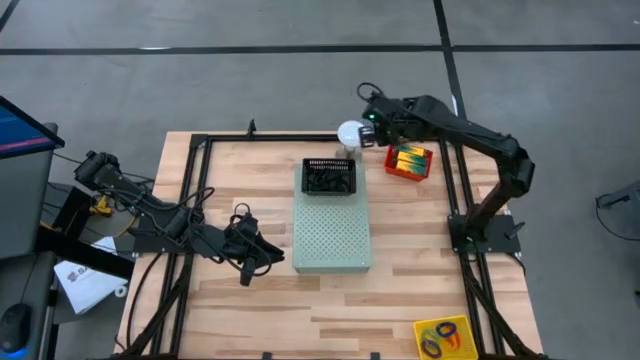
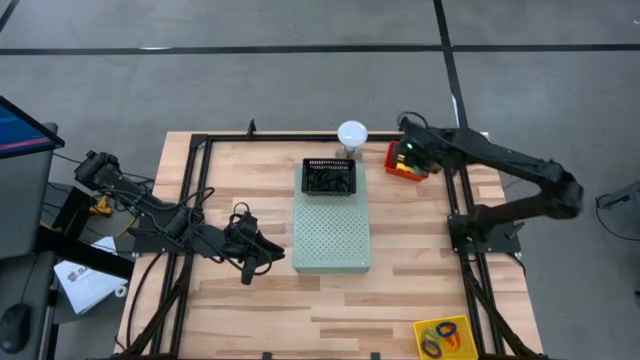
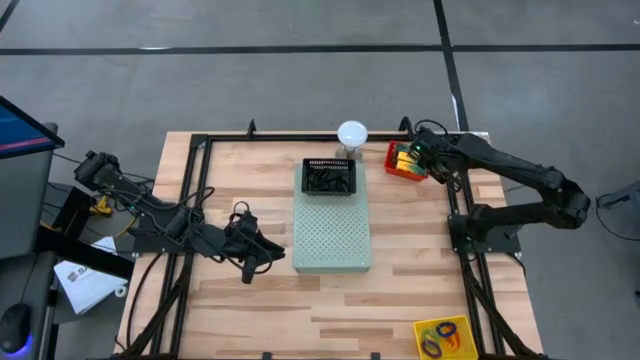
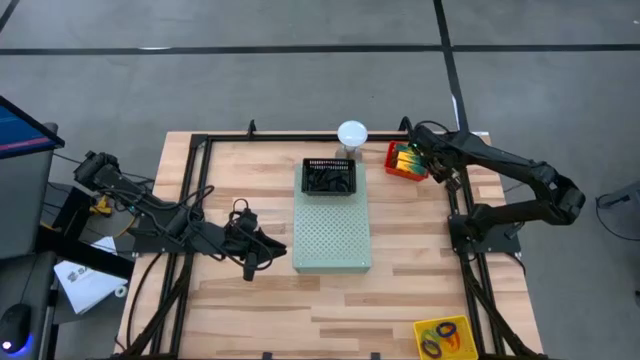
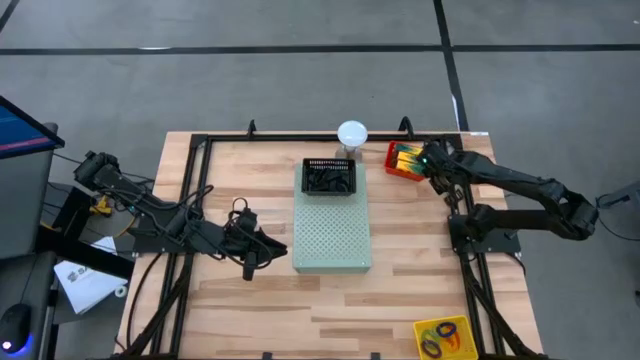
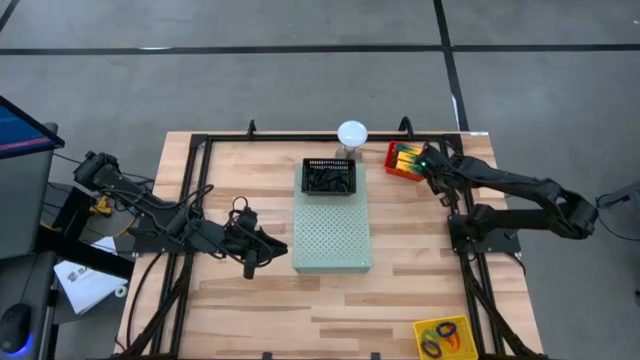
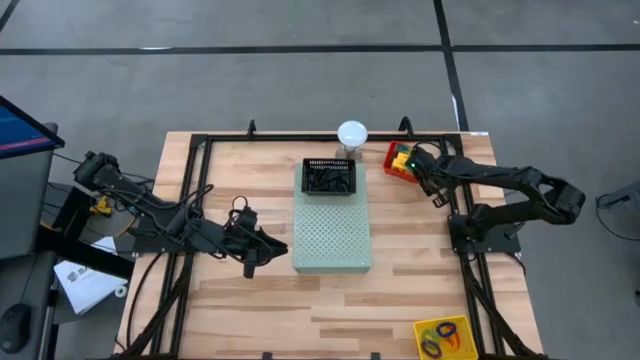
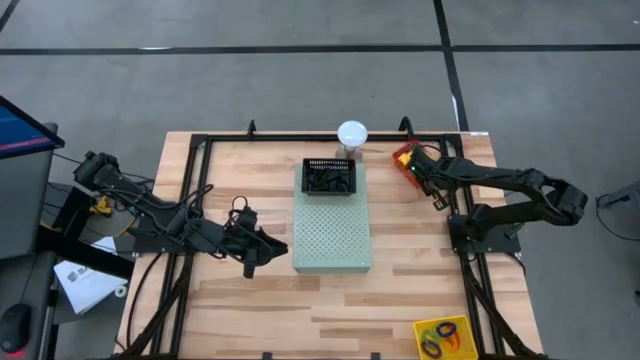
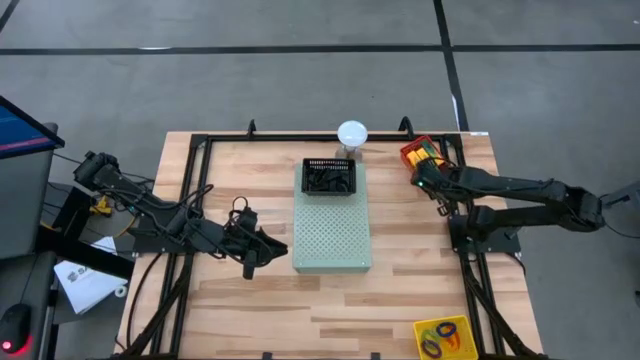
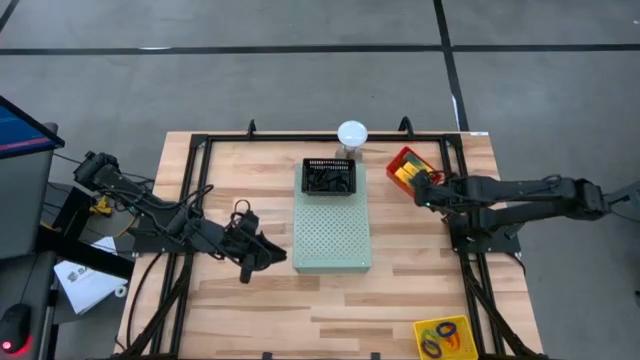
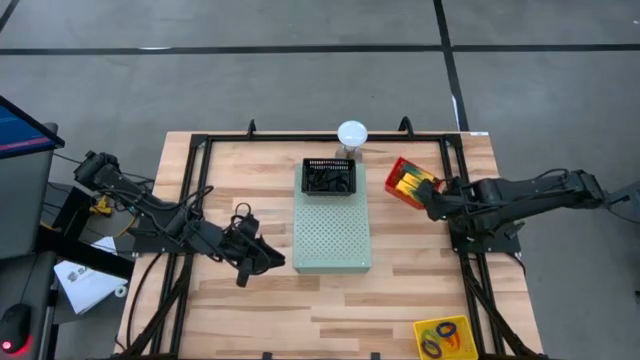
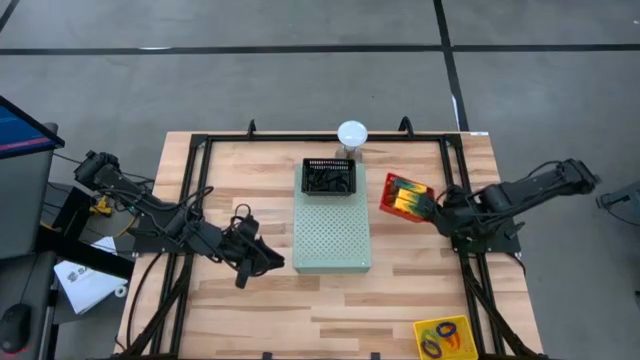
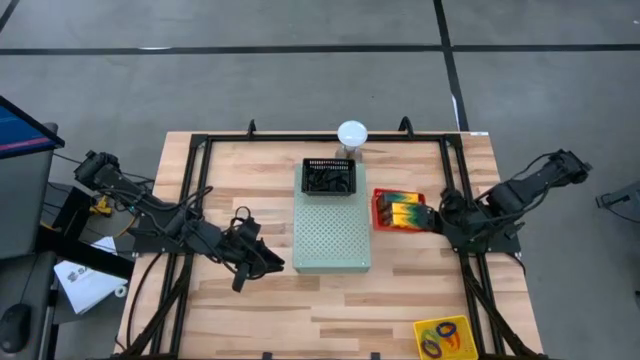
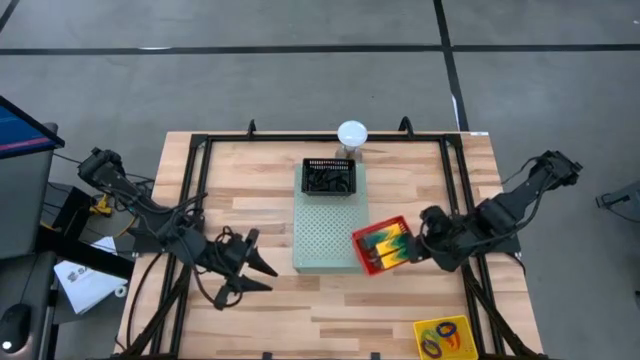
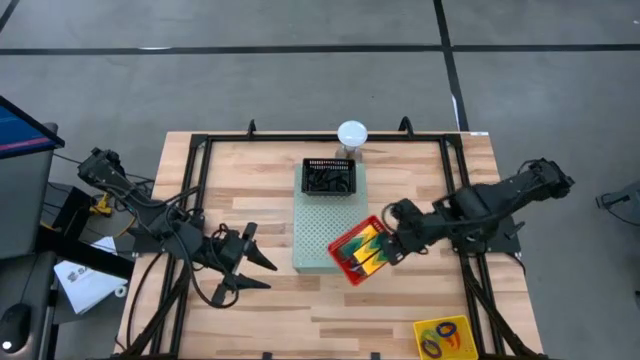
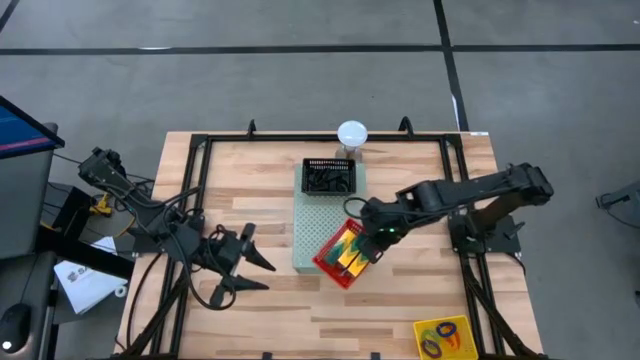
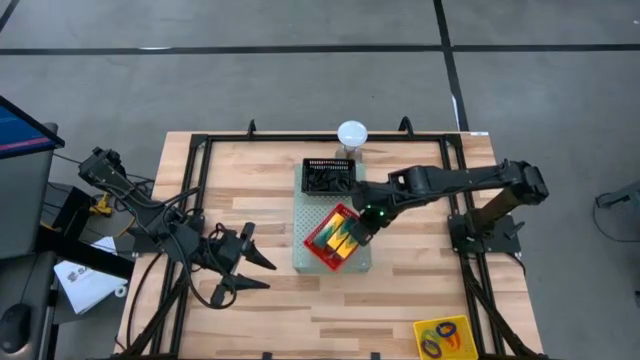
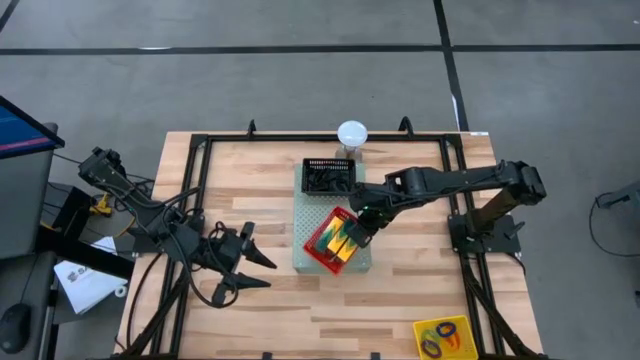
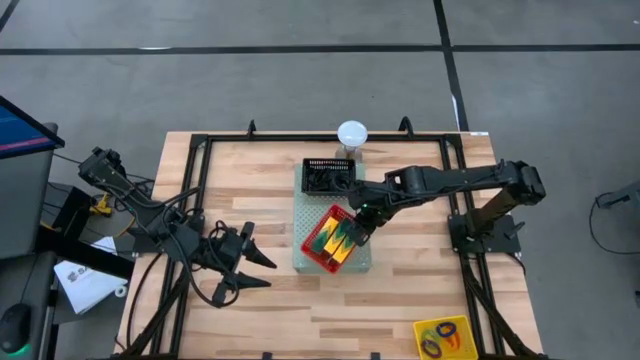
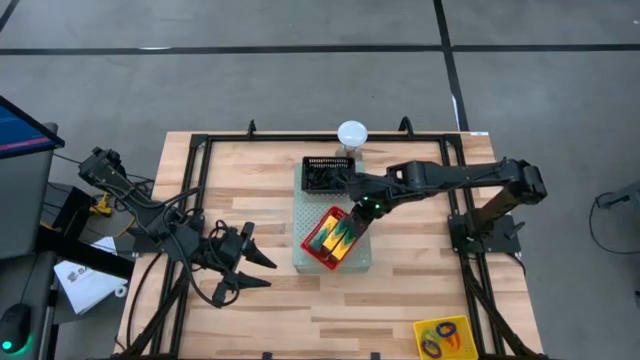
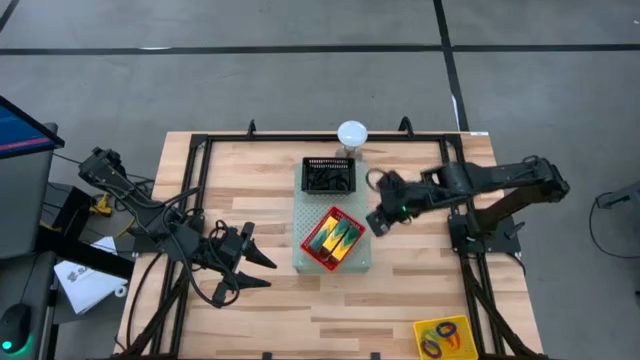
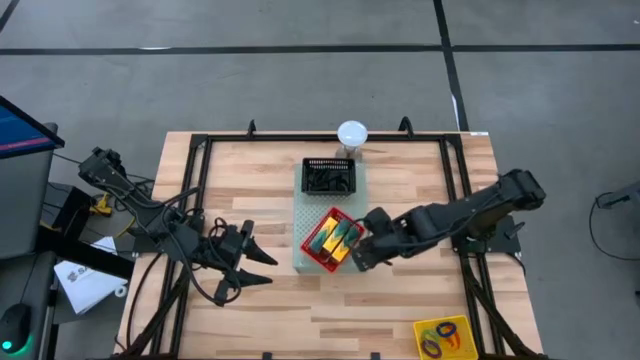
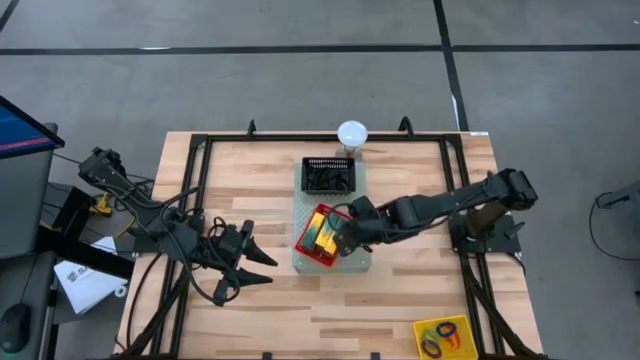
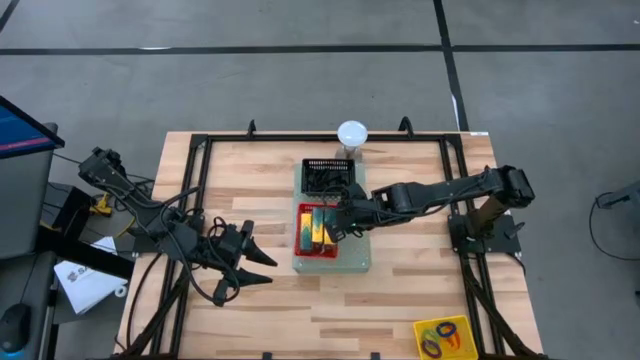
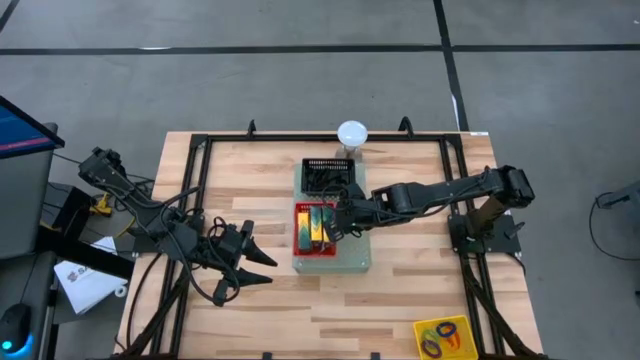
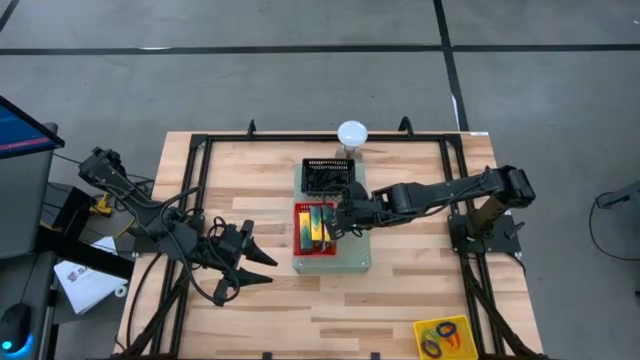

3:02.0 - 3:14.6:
Task: Pick & Place Office Desk Supplies
Put the red bin on the shelf

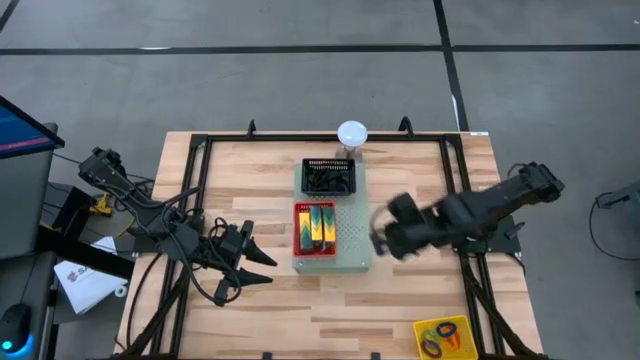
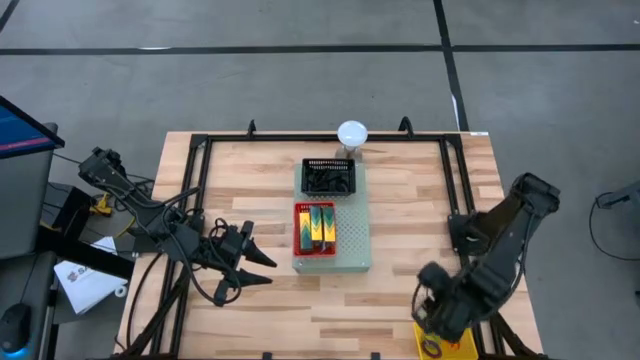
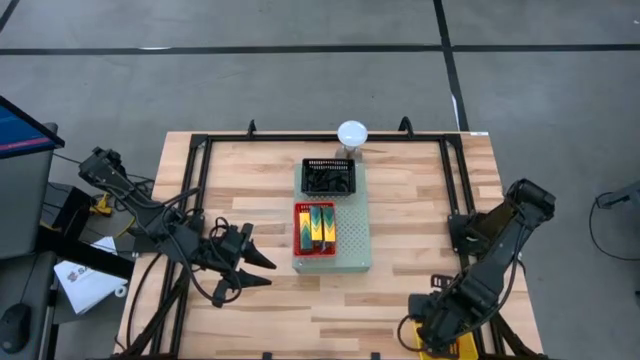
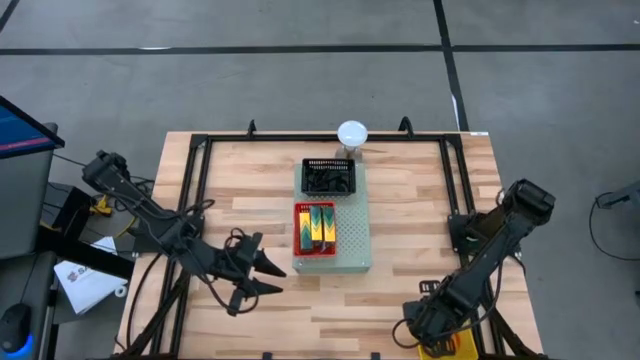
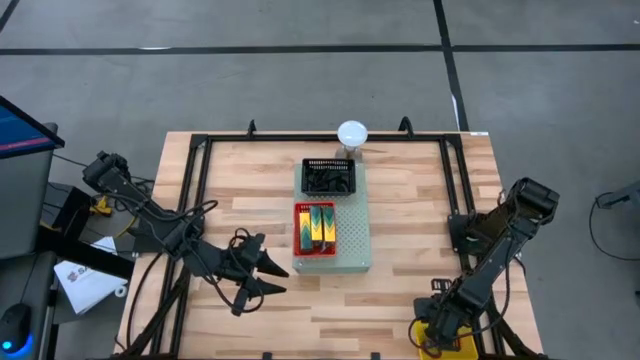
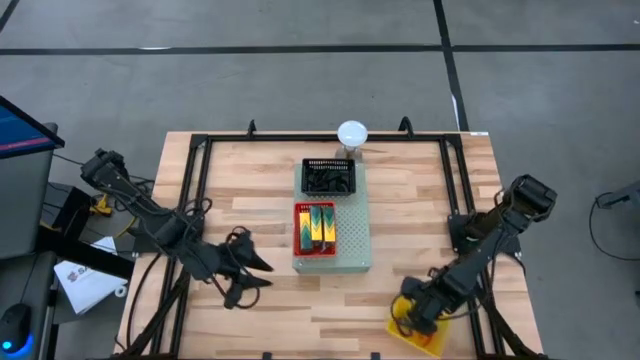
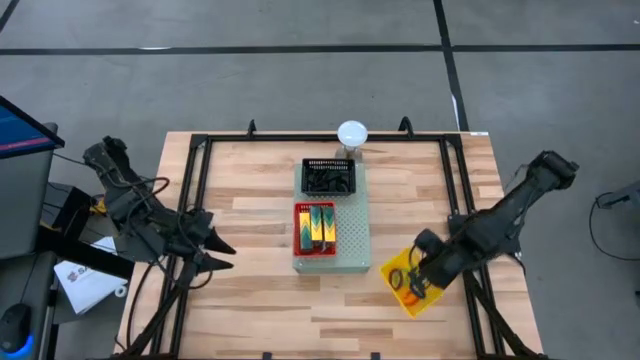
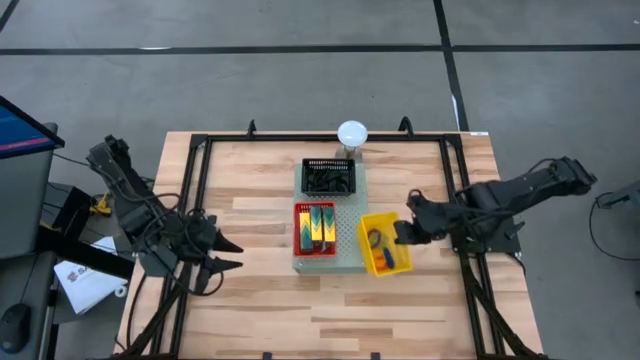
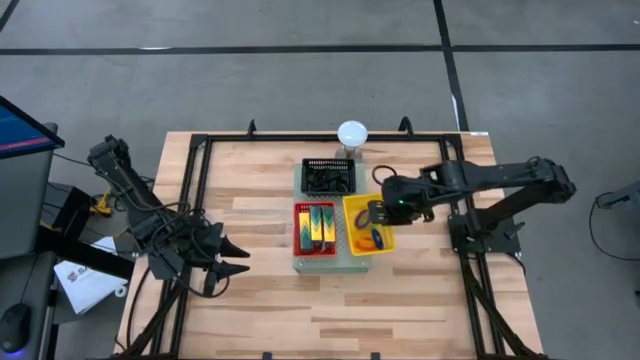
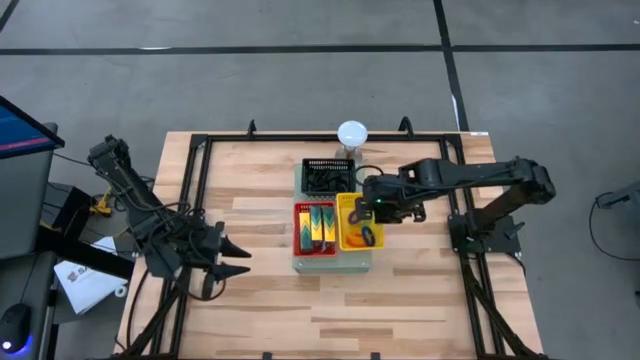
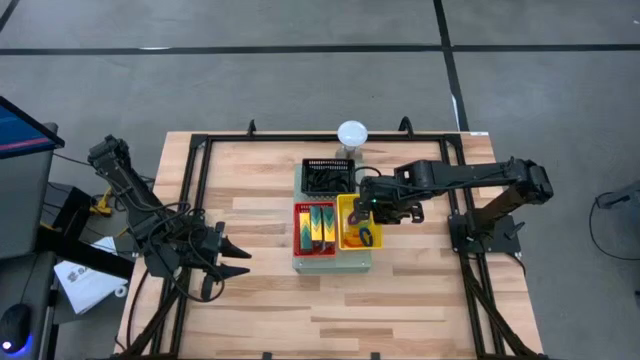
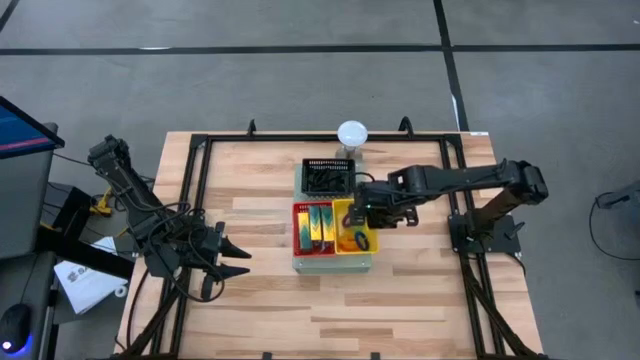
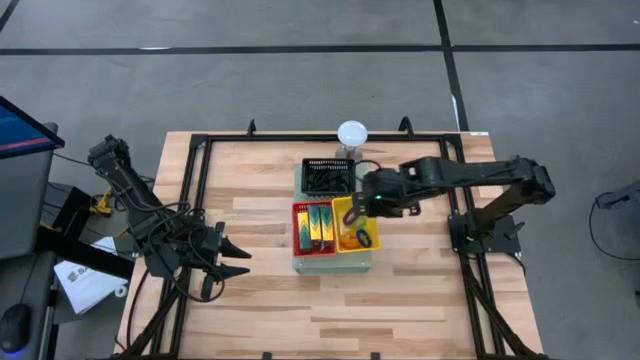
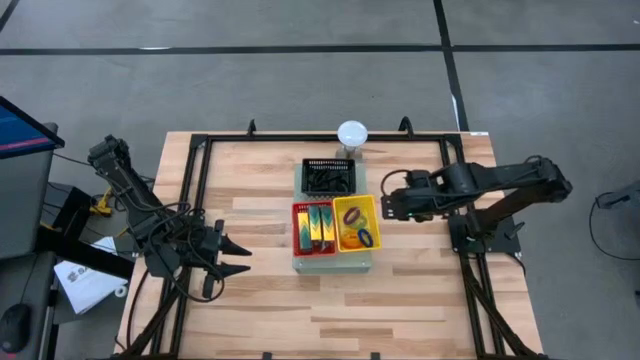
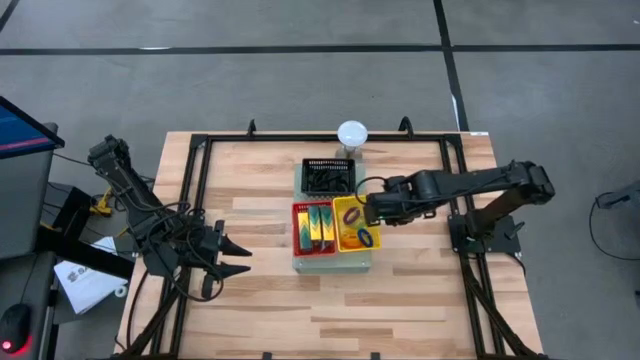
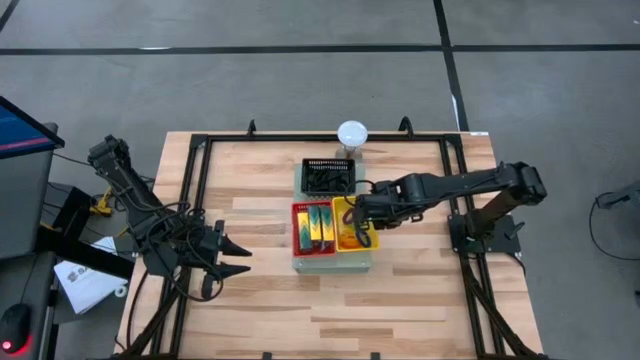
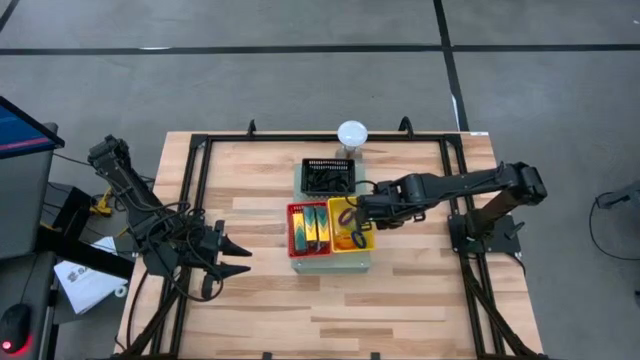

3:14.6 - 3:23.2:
Put the yellow bin on the shelf
